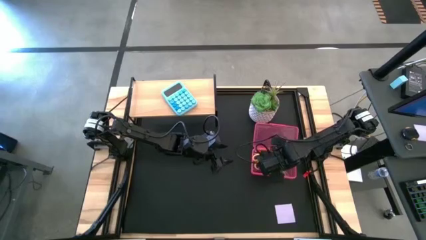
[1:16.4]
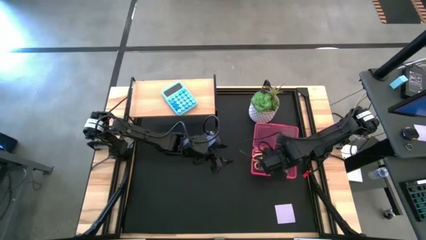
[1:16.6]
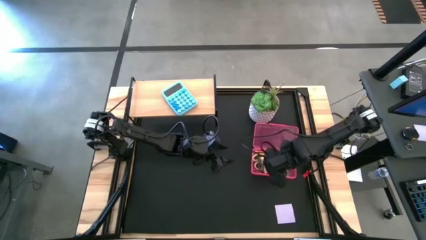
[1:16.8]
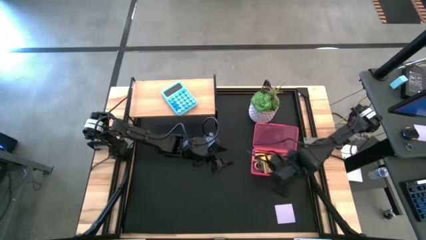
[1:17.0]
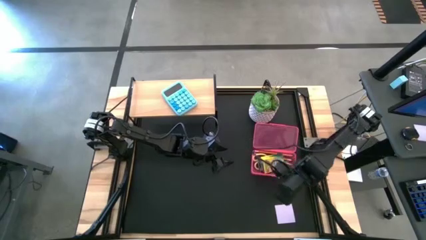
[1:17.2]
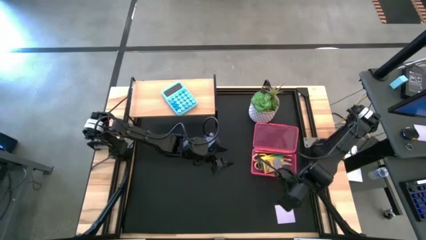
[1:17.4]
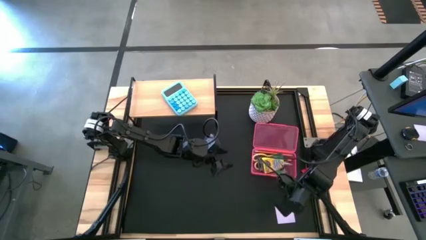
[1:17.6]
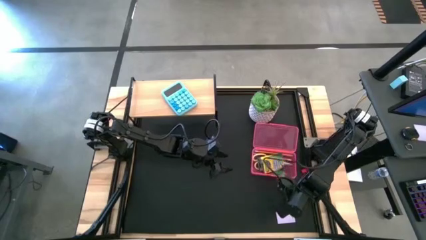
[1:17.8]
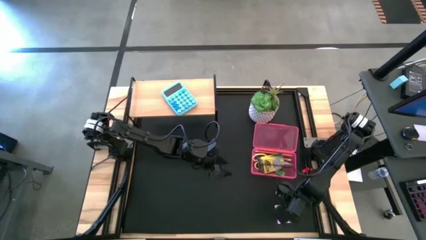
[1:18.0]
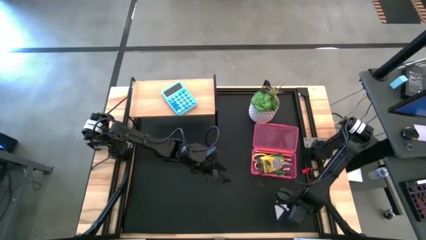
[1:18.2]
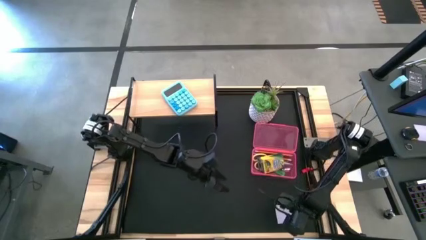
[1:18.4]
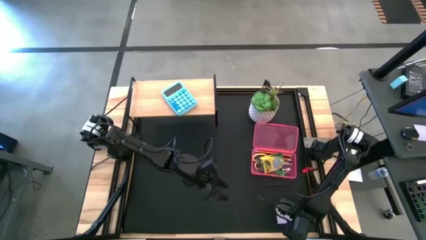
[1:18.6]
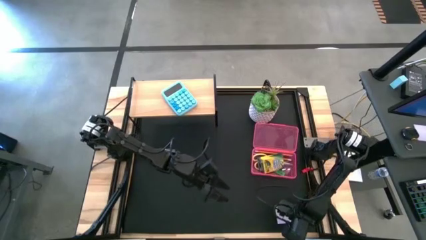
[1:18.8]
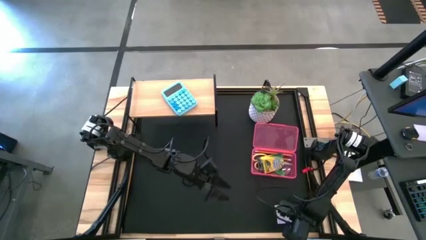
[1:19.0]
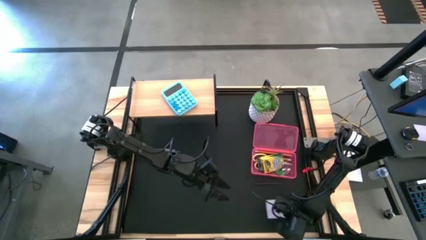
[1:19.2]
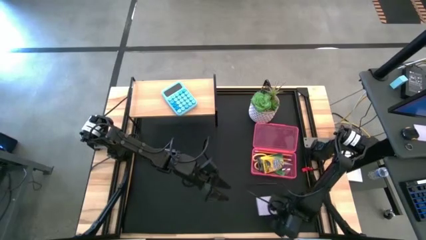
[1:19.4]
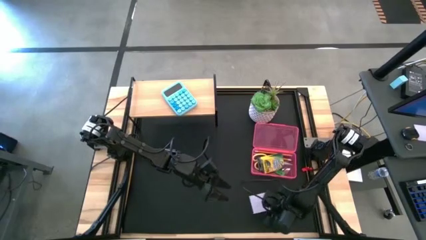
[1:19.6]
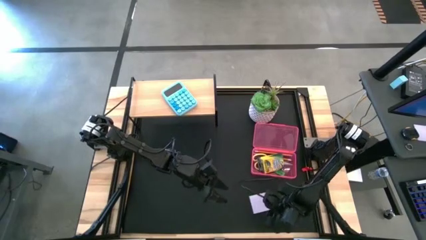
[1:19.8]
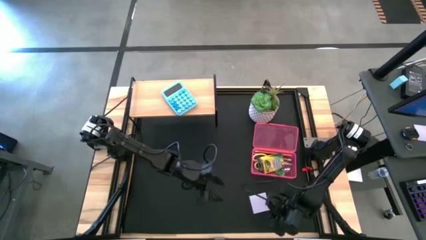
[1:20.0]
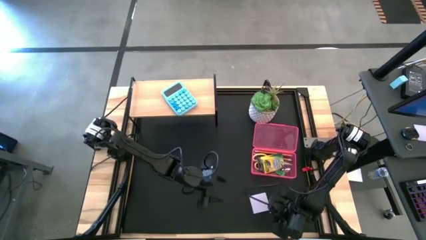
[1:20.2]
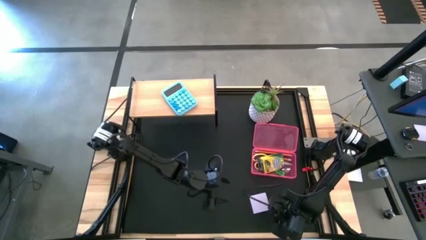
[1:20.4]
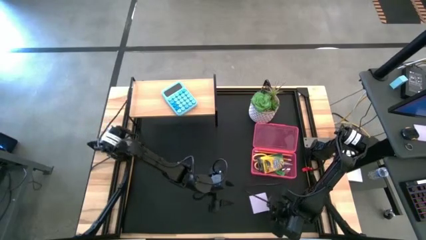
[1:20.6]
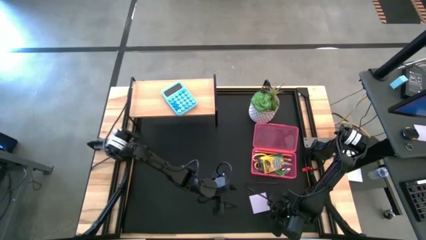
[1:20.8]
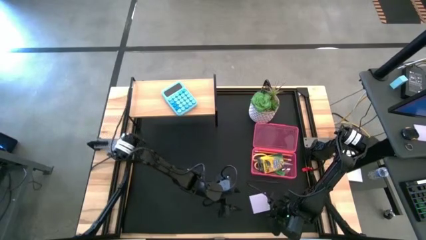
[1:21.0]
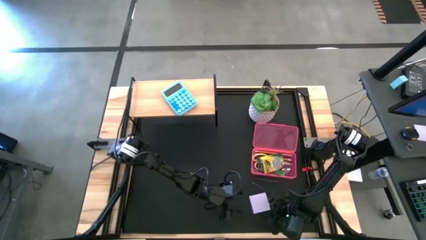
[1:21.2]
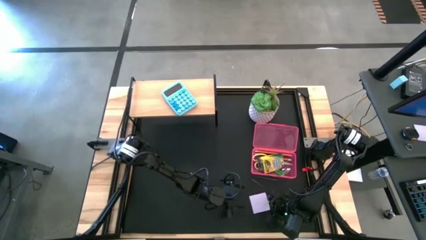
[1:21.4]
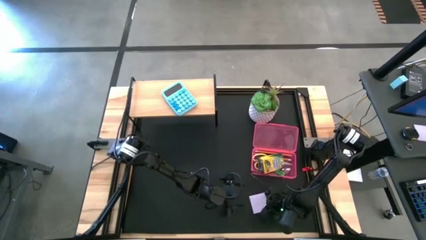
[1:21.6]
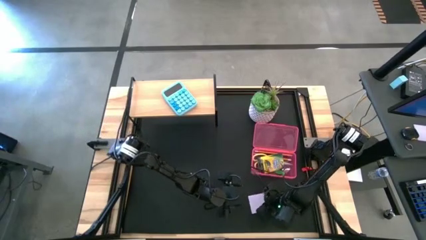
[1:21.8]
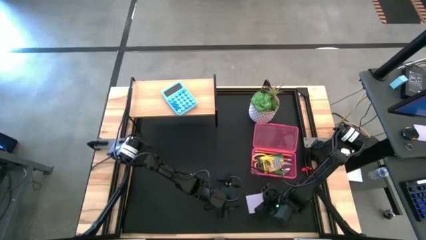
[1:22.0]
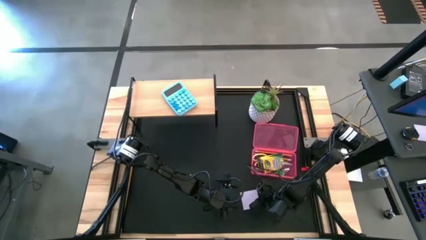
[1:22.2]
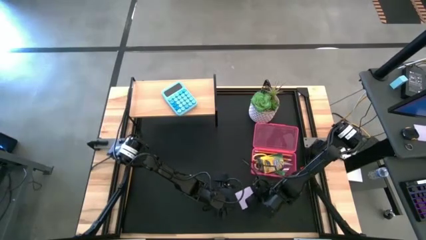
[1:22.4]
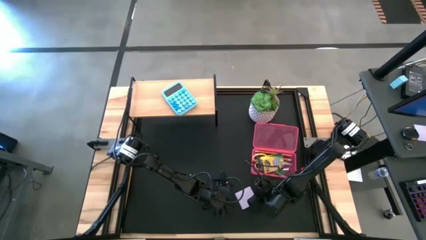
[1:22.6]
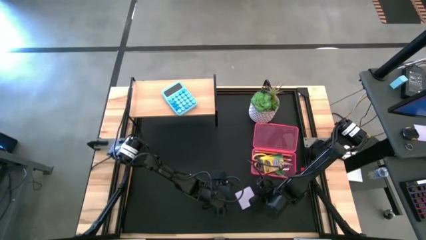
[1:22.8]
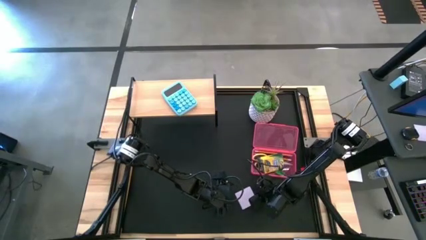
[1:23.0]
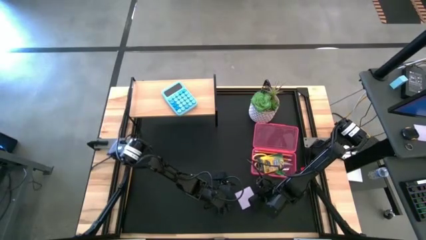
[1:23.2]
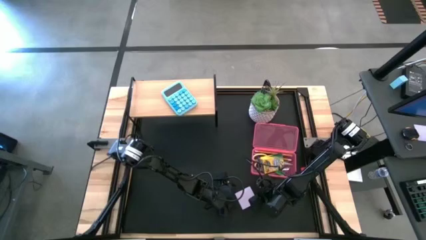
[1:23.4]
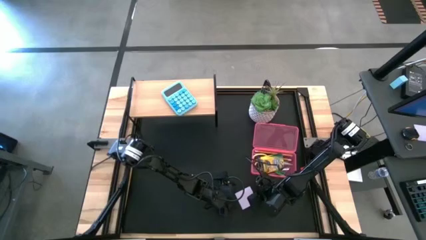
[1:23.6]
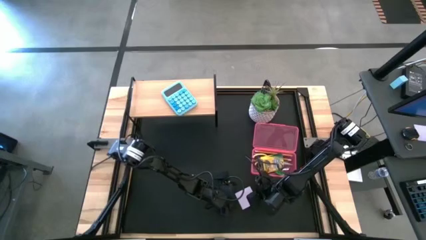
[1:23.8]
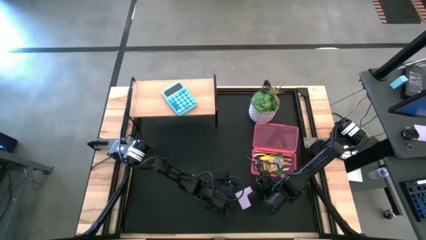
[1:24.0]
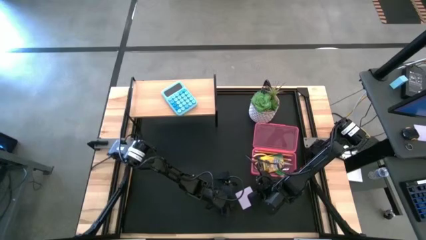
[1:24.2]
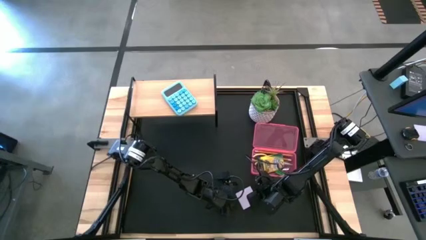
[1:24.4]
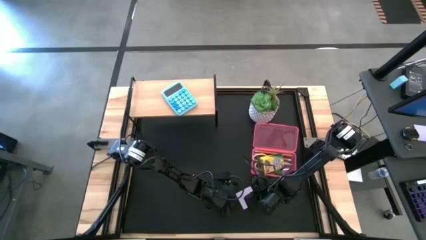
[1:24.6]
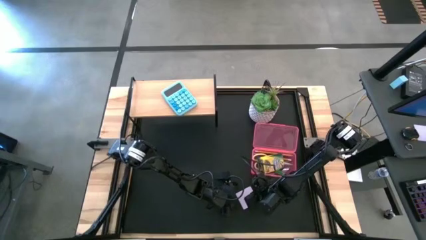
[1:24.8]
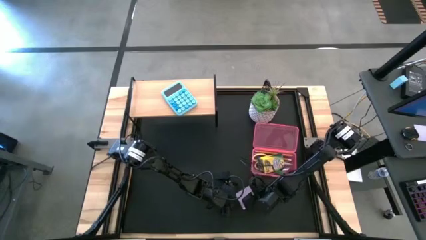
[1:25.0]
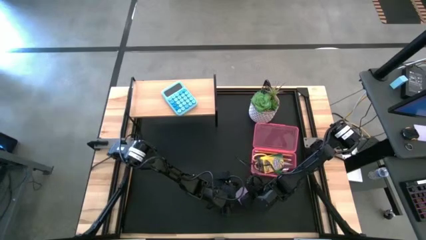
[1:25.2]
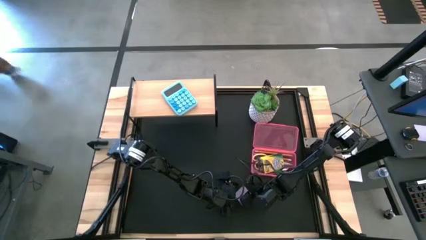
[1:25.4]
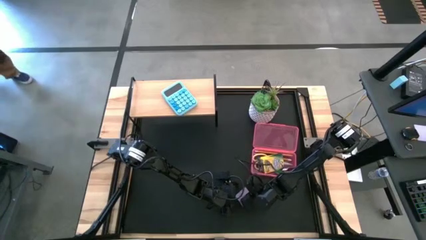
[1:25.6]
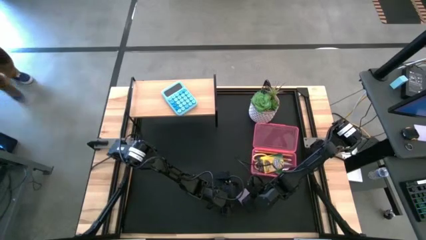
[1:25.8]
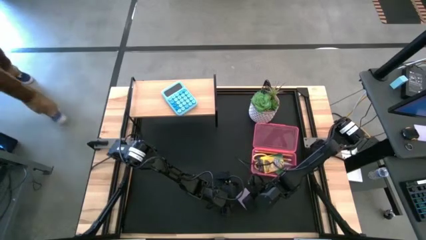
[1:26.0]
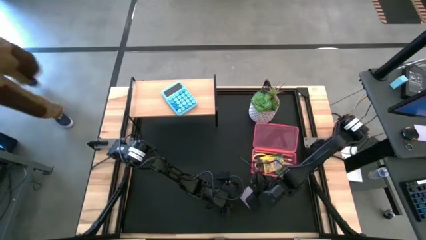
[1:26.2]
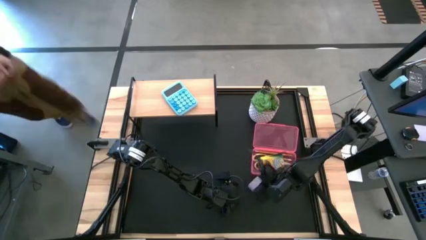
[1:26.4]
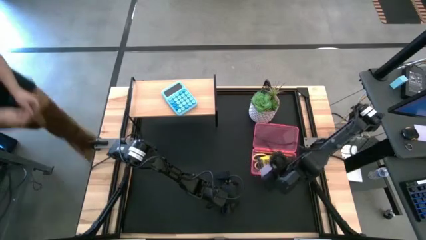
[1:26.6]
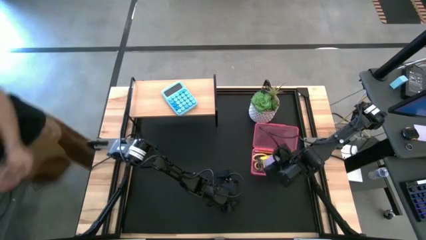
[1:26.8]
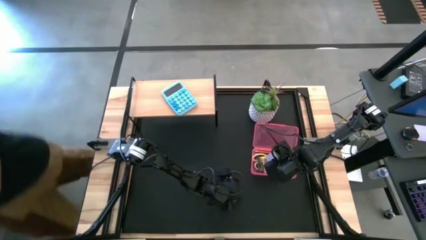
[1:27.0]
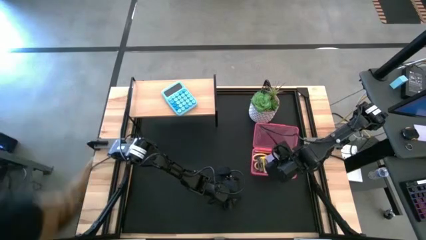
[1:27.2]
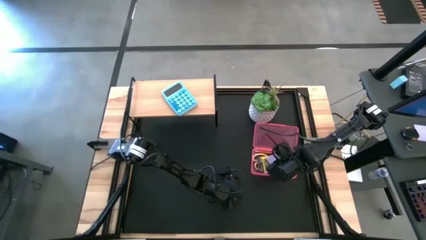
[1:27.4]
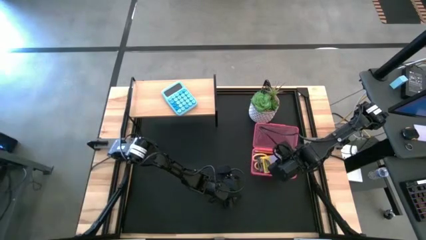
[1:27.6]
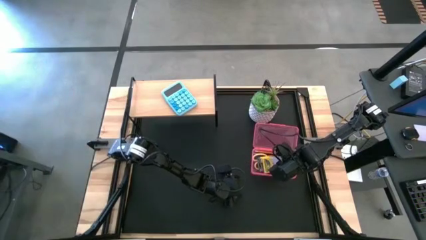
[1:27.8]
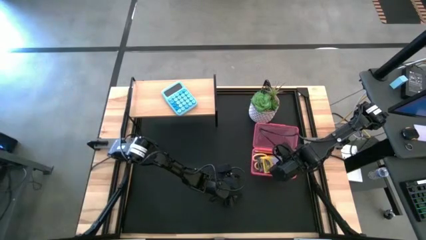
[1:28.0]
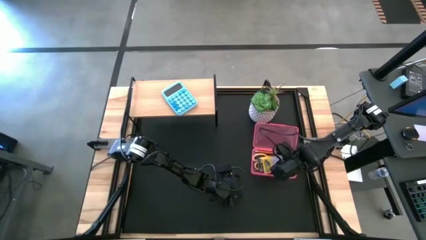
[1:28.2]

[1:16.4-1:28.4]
Task: Pack school essentials
Put the purple sticky note into the pink supply box

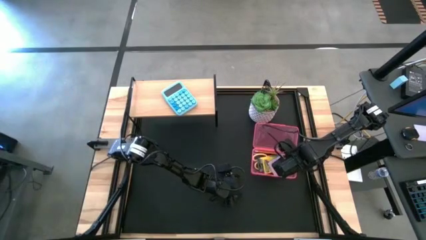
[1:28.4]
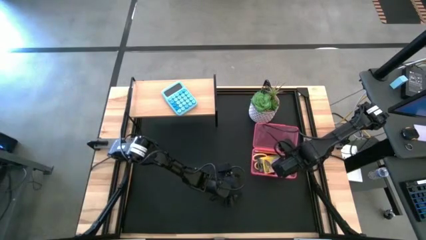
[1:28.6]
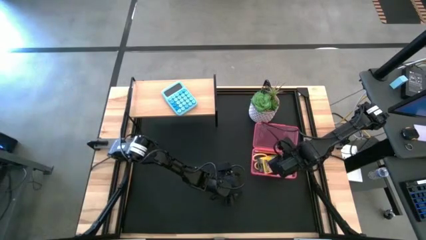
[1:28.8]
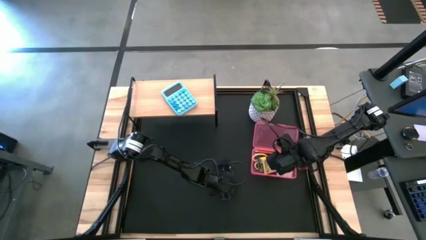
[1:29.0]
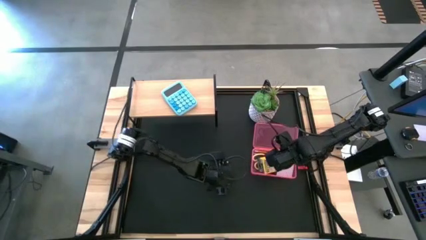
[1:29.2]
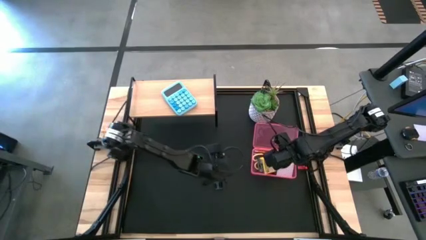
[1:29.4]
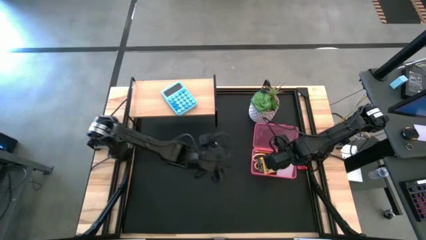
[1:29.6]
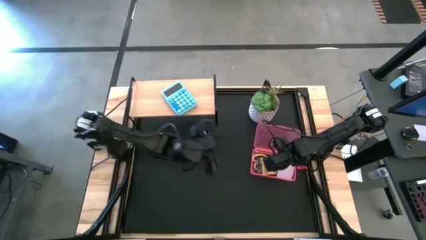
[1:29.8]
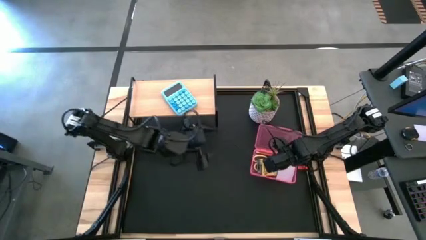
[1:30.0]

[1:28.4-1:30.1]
Adjust the yellow crayon box in the pink supply box
